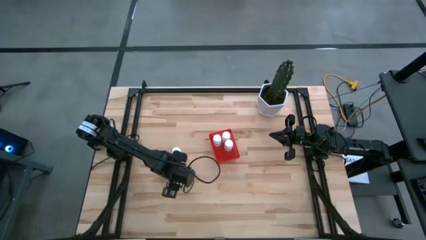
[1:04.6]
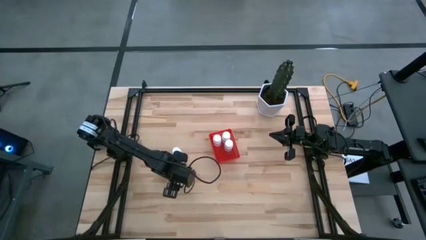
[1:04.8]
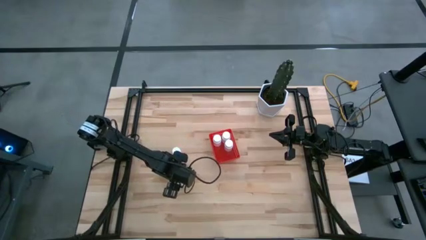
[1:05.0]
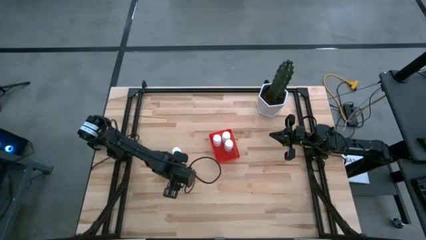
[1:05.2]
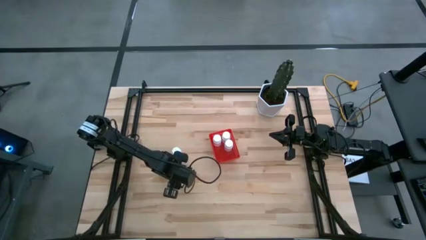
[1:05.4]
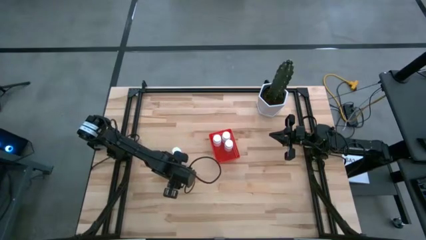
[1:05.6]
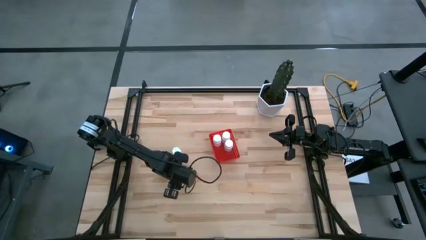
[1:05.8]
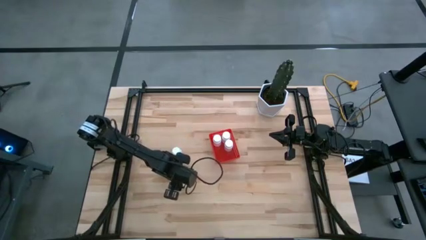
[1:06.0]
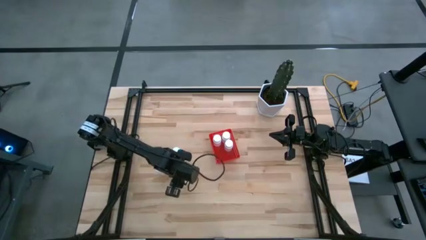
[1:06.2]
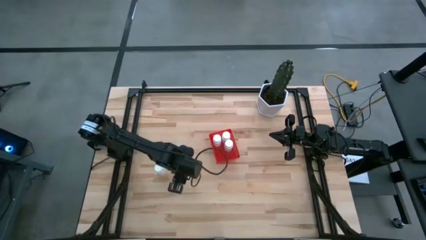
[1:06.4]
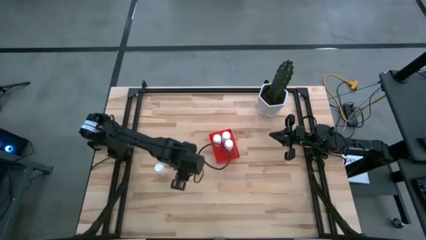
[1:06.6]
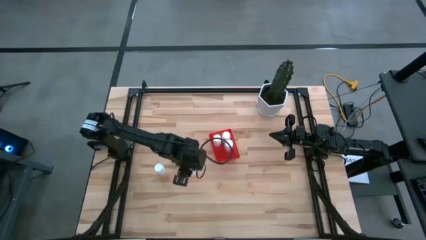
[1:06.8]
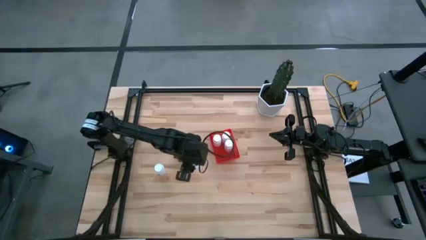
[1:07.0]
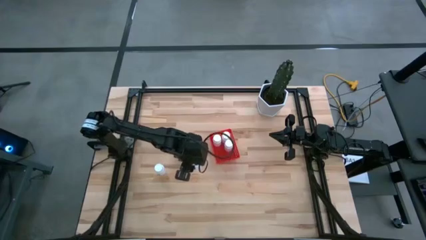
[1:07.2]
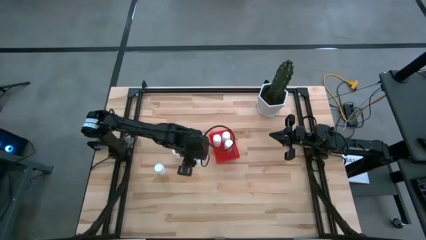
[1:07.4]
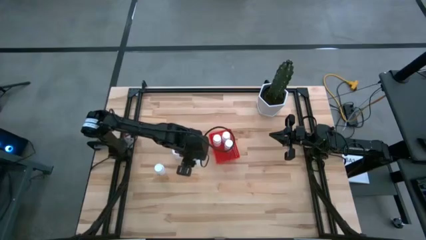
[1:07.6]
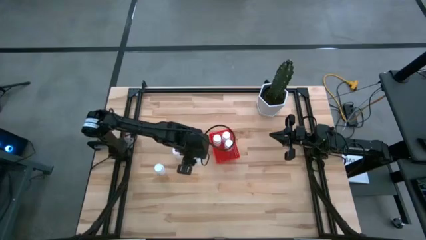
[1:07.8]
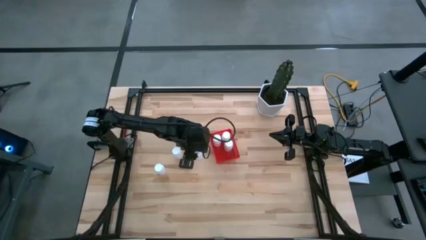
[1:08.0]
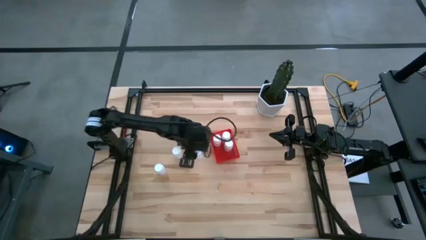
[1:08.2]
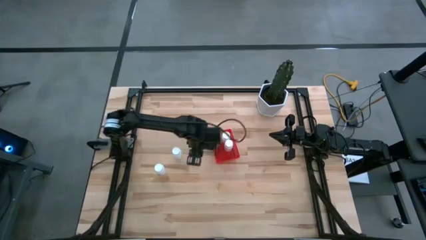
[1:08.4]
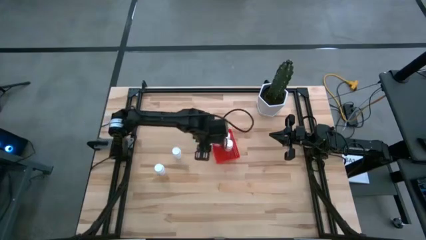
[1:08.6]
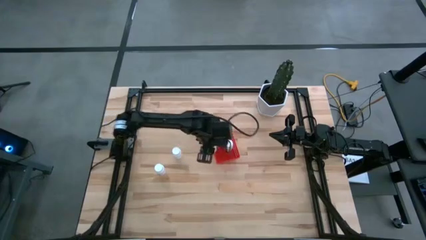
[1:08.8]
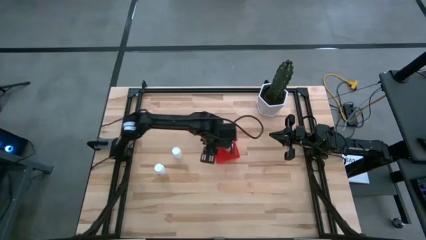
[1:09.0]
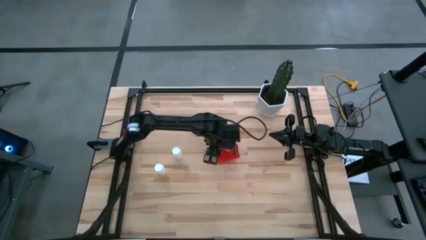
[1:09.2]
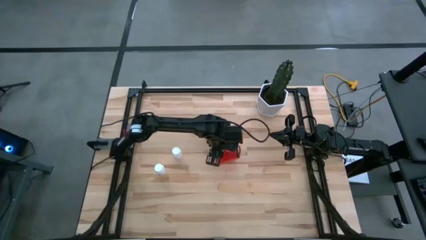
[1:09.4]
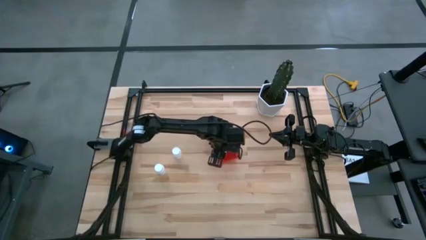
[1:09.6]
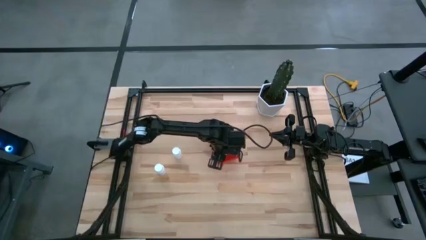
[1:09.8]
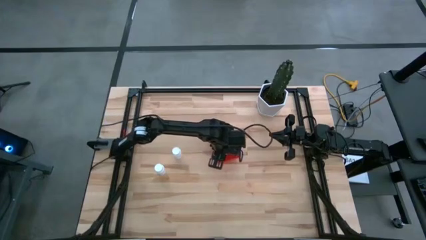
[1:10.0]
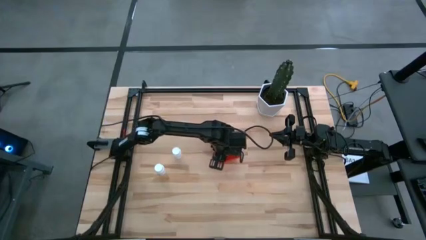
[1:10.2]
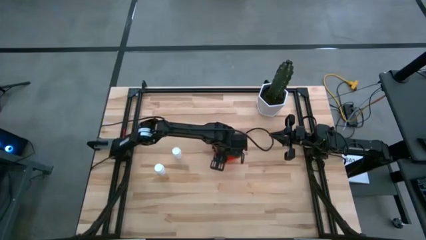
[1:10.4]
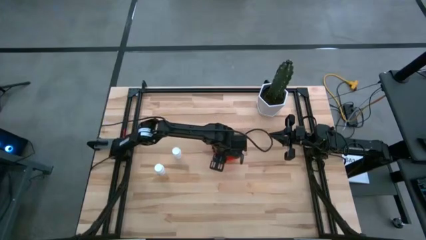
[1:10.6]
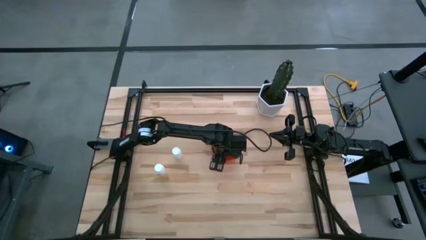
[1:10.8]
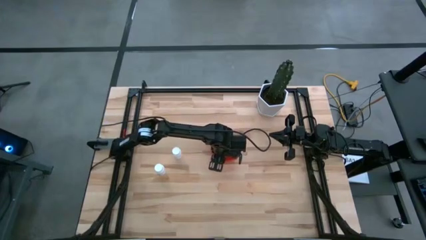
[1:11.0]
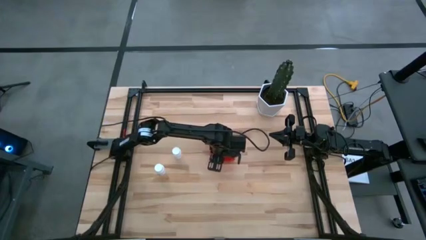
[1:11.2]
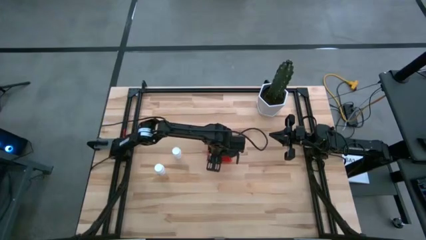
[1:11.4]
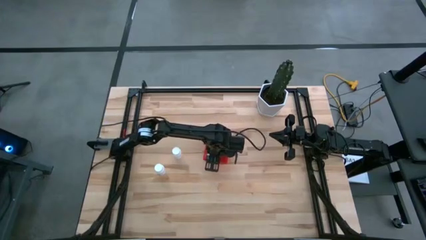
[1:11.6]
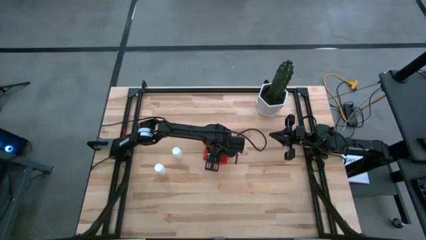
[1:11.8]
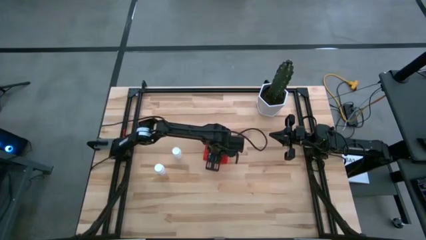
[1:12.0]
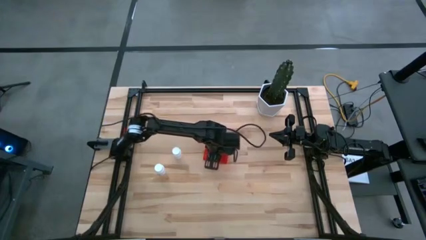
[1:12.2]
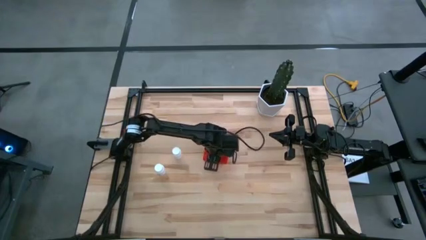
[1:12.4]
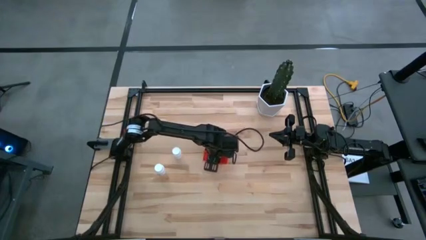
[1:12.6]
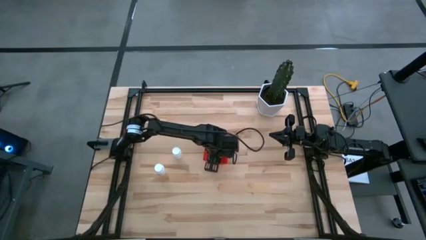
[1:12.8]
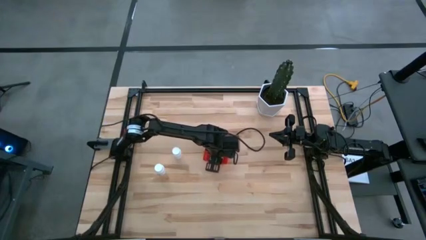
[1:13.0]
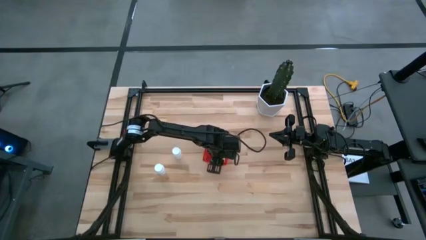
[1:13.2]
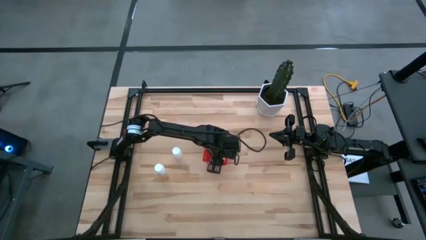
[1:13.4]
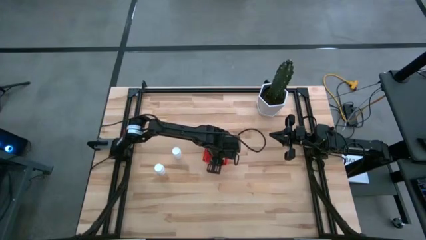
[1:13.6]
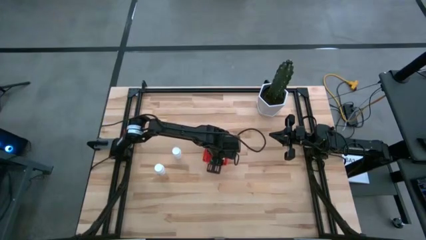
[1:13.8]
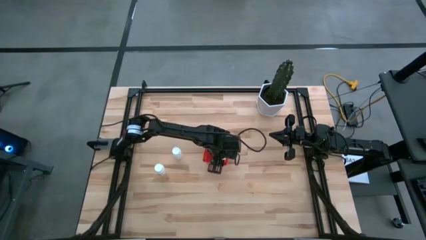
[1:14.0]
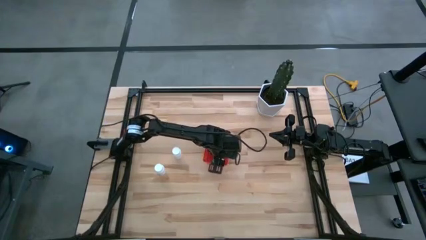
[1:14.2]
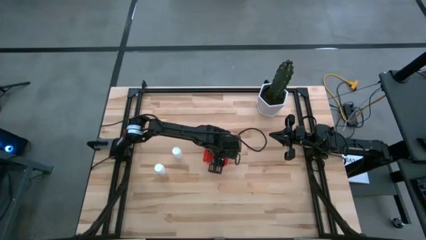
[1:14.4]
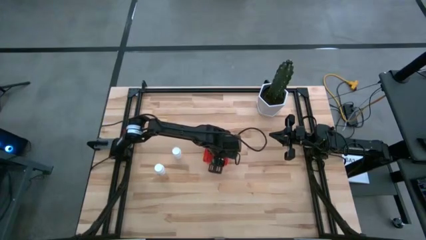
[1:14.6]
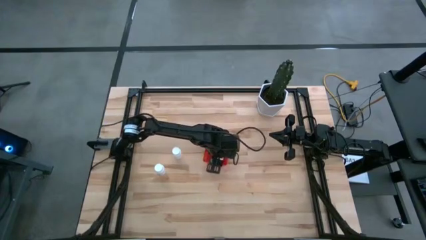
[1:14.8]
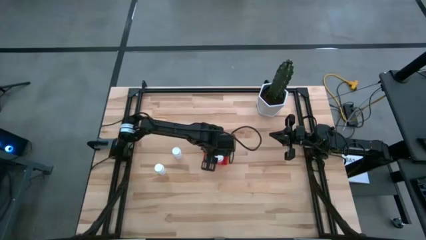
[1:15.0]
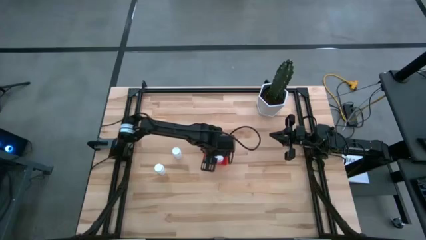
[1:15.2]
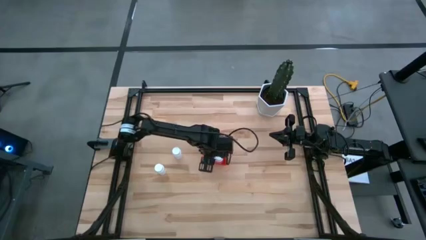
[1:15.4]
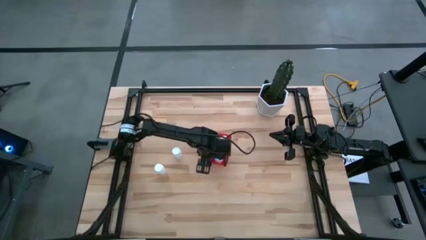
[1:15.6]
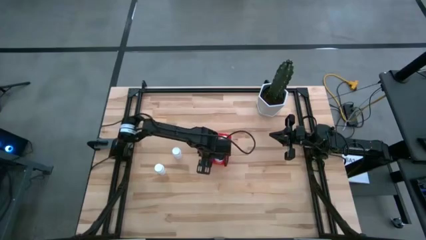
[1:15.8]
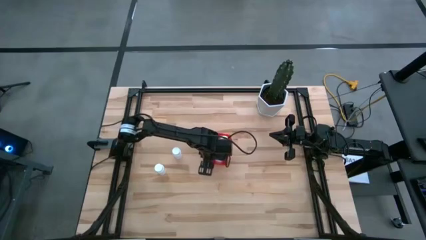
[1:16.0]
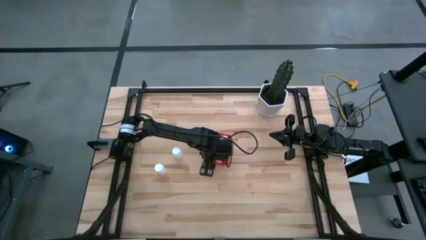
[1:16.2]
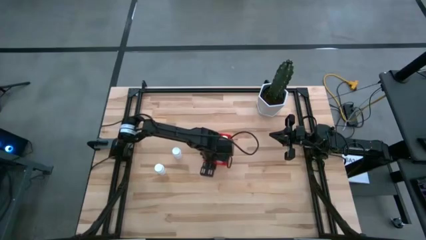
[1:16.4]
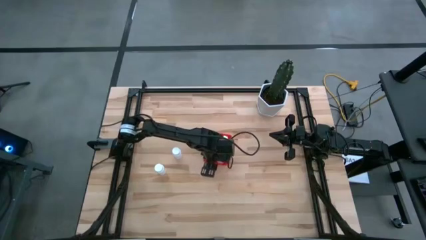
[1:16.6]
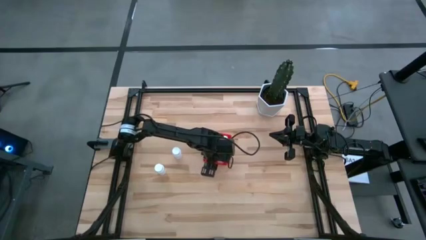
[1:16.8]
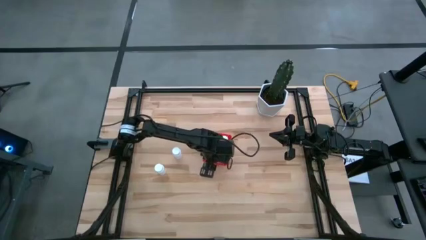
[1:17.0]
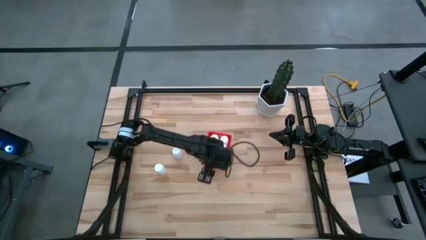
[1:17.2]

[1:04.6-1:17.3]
Task: Pick and place pill bottles into a basket
Put the bottom right white pill bottle into the red bin
